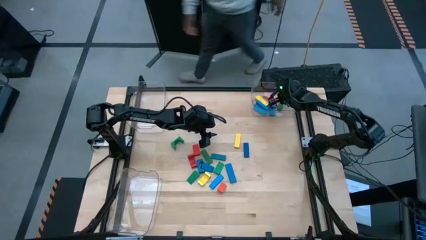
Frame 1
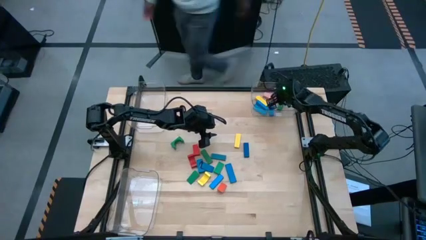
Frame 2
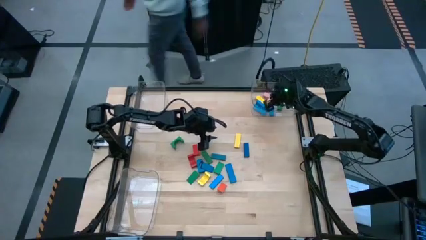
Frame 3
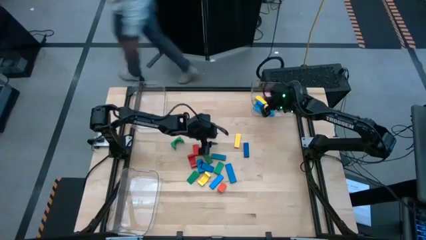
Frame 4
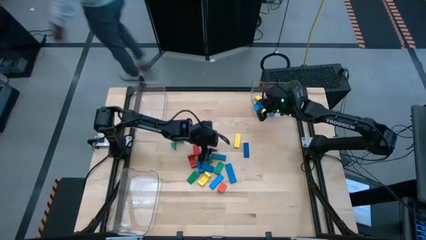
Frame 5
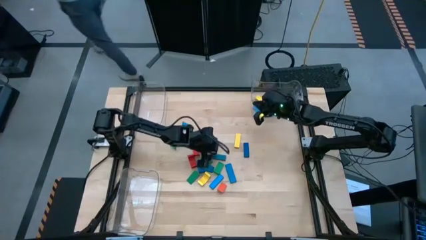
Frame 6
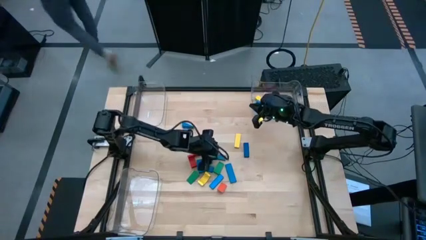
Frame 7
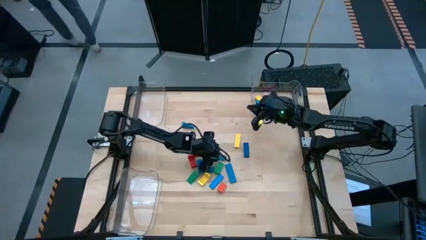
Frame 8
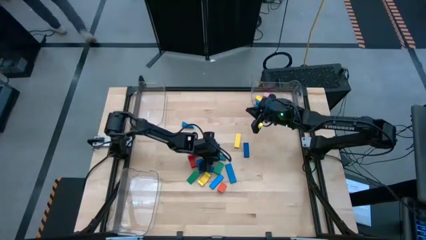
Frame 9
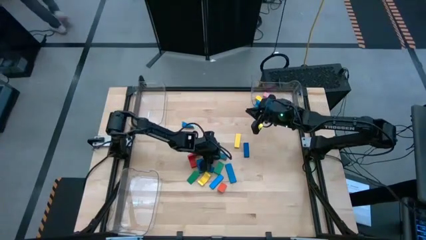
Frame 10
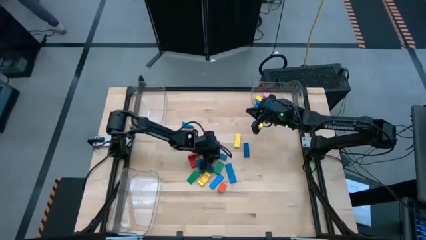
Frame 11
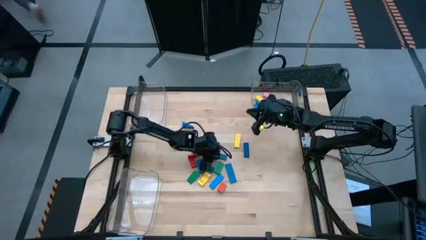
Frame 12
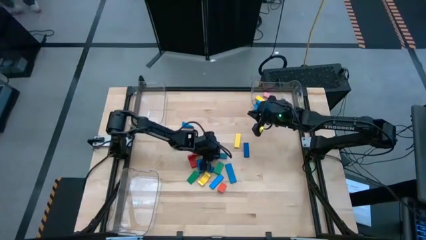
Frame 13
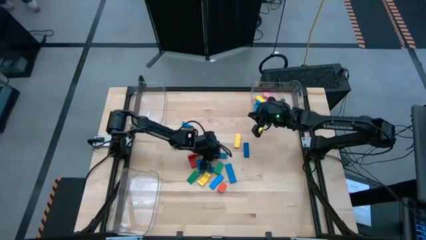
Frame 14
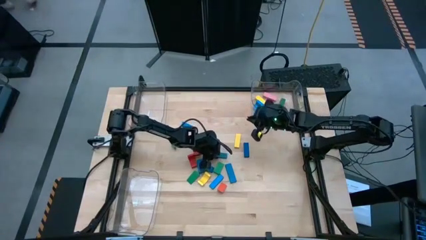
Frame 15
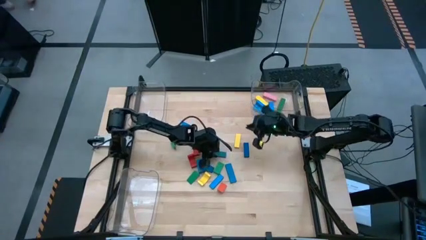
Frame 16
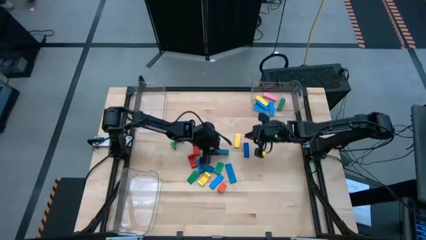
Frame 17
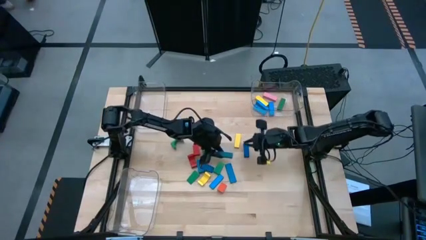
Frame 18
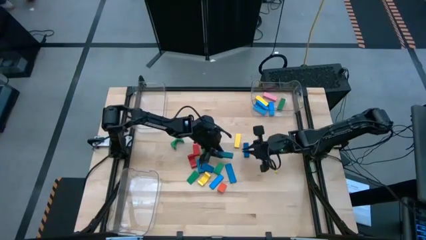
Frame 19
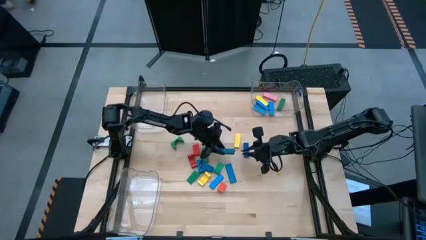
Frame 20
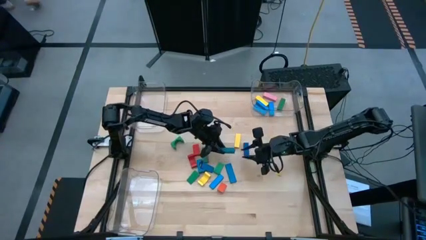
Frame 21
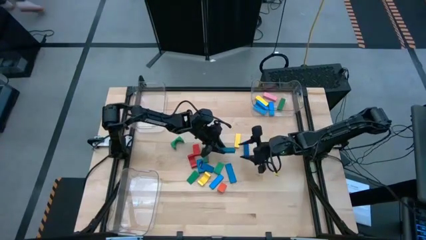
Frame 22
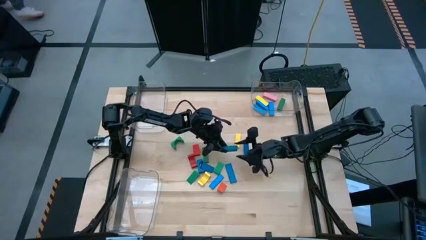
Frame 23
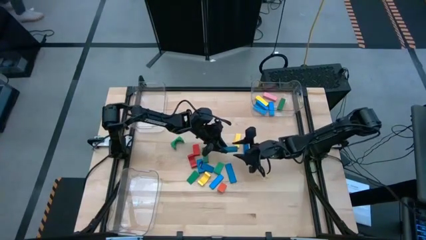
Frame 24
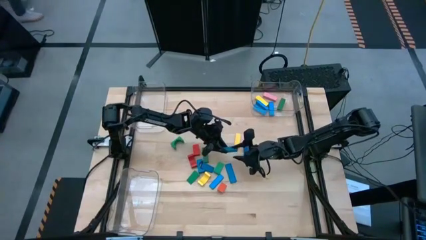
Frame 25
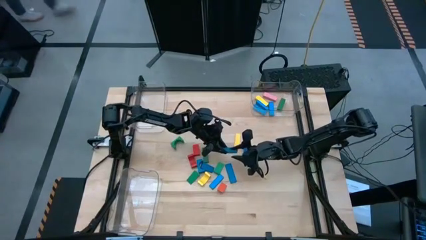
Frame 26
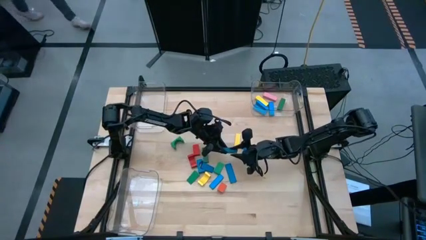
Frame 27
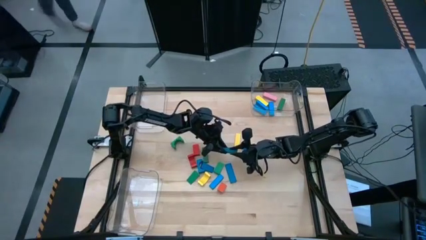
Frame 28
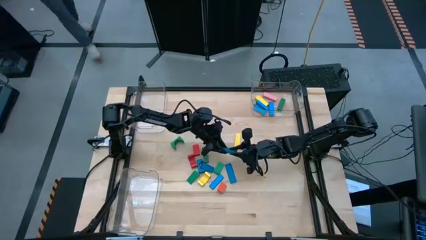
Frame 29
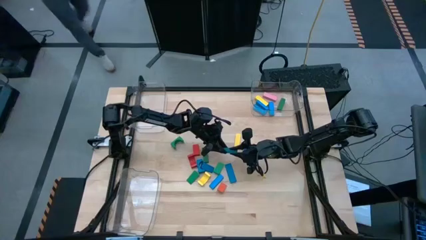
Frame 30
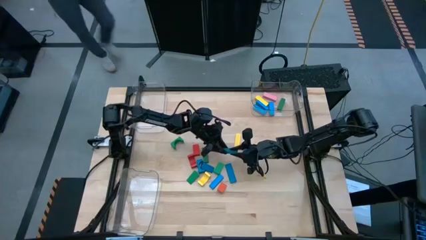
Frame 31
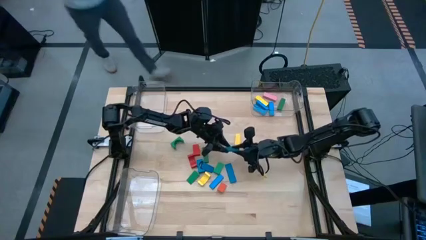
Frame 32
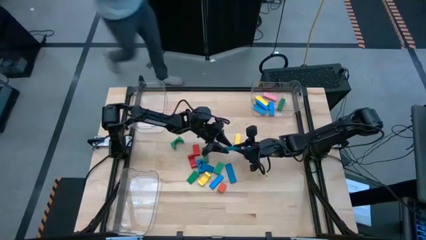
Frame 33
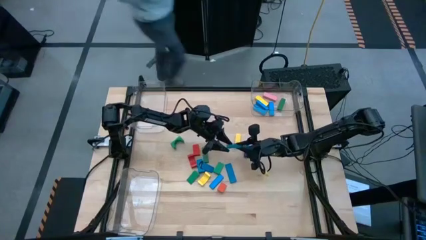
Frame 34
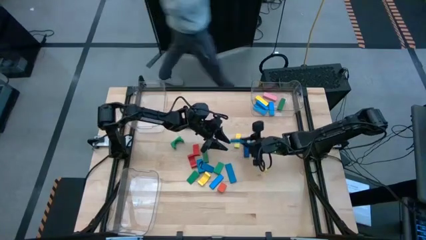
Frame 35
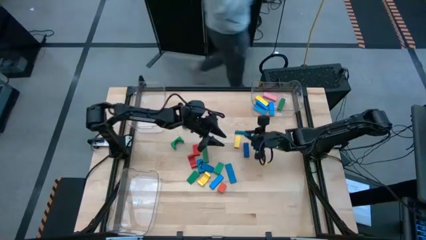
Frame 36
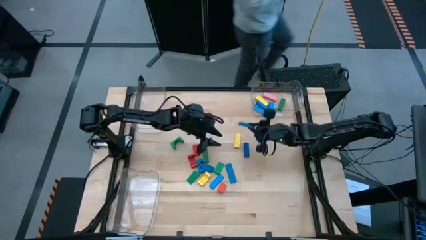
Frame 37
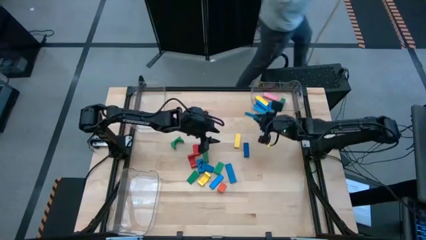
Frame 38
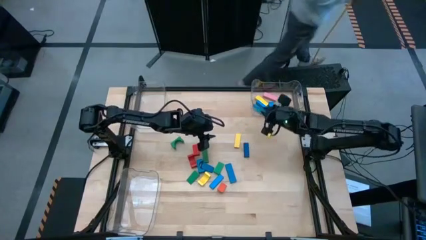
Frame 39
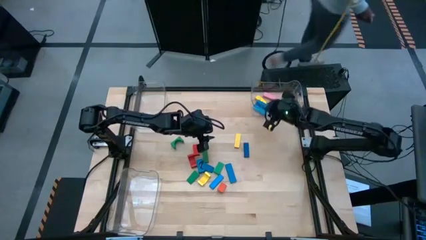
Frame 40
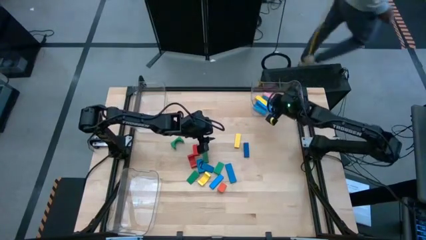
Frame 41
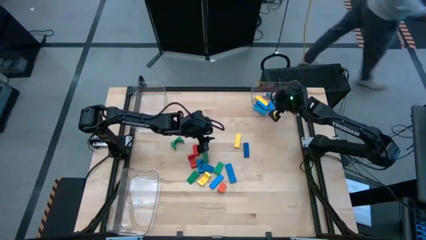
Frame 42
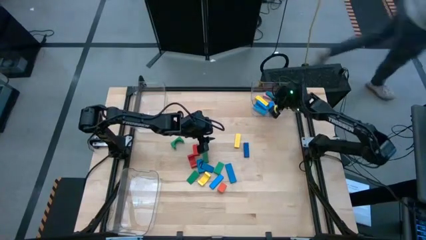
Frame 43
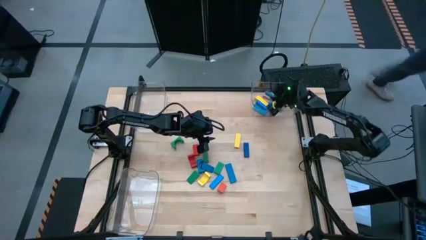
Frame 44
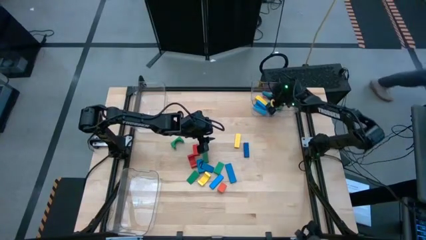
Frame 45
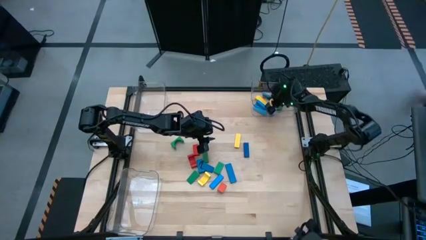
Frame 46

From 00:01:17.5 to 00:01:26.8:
Task: Sort blocks by size
Put the blue rectangular block into the top right transparent bin

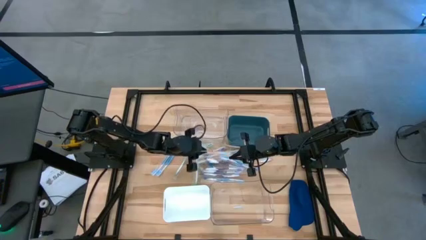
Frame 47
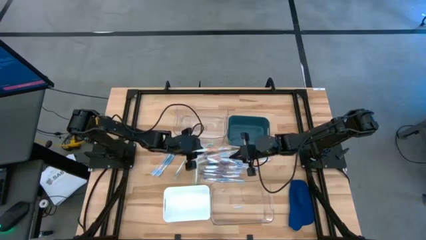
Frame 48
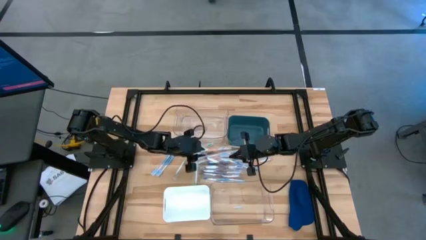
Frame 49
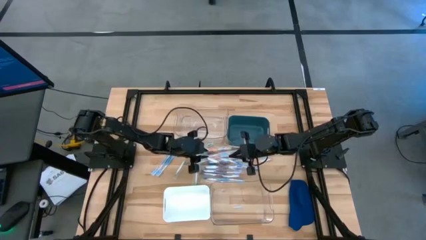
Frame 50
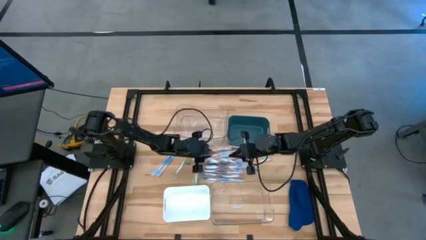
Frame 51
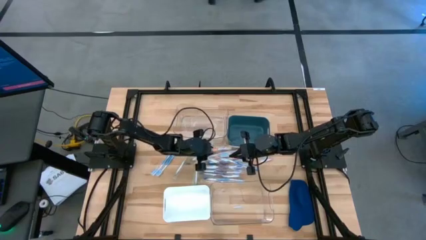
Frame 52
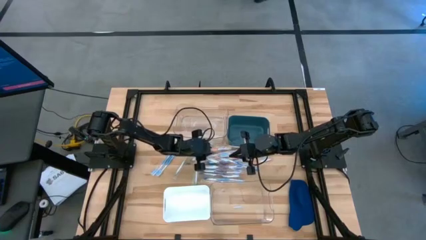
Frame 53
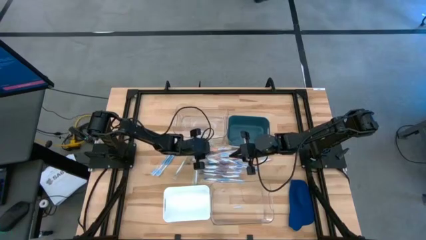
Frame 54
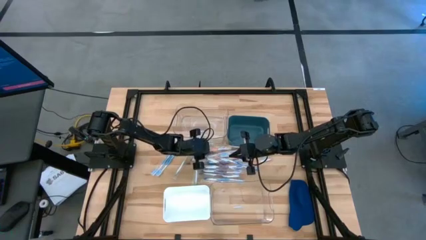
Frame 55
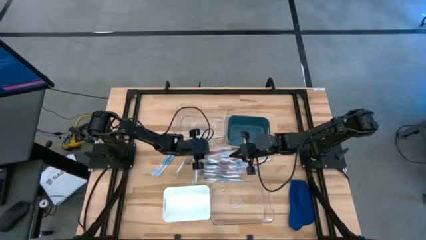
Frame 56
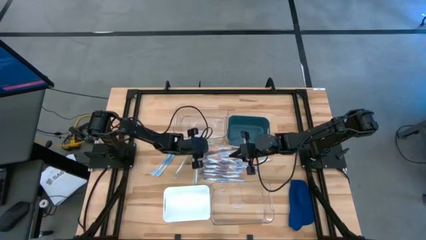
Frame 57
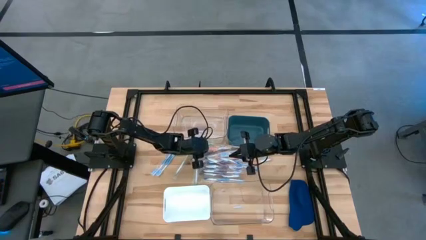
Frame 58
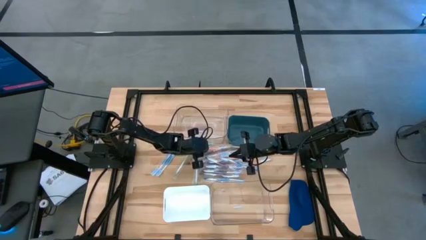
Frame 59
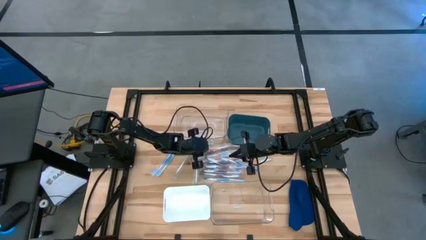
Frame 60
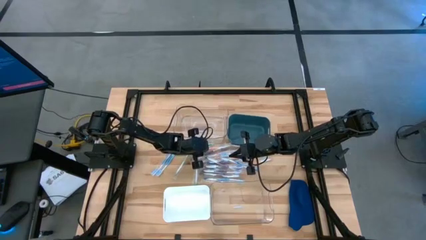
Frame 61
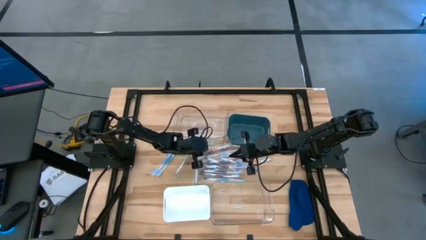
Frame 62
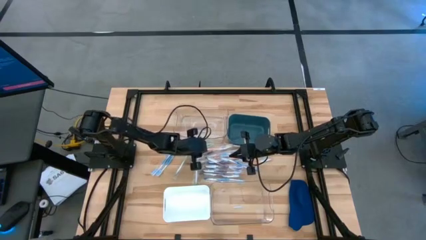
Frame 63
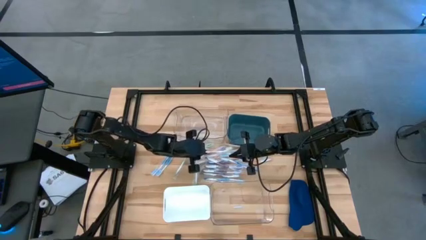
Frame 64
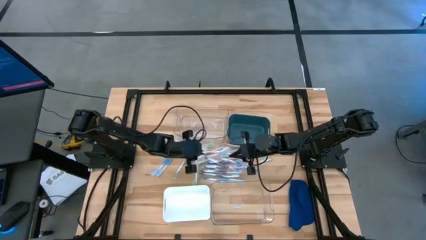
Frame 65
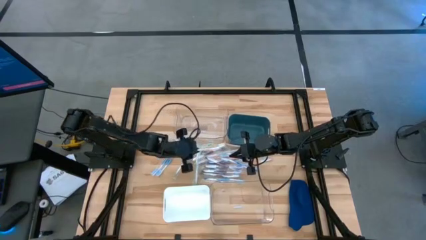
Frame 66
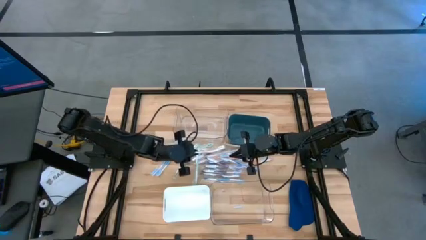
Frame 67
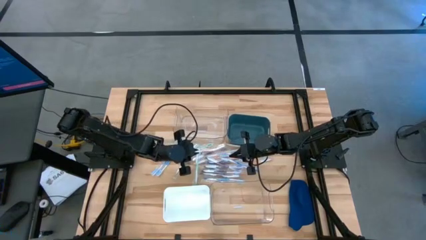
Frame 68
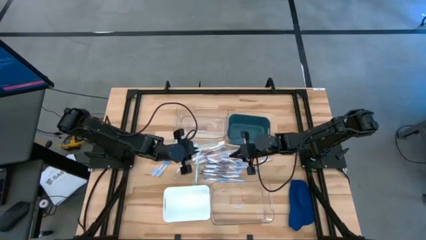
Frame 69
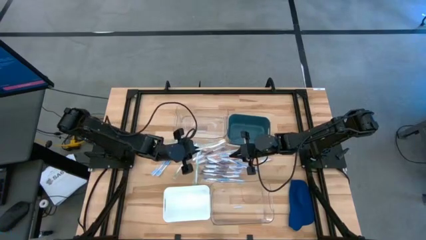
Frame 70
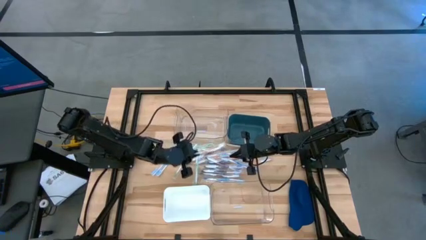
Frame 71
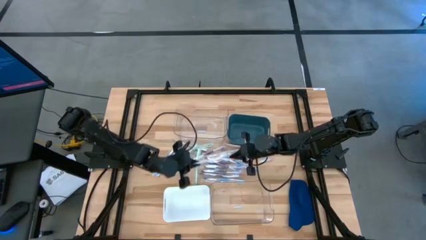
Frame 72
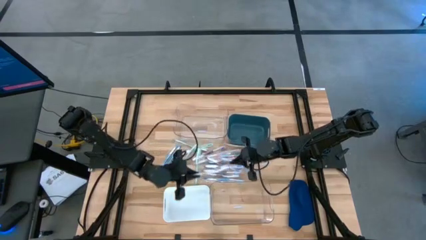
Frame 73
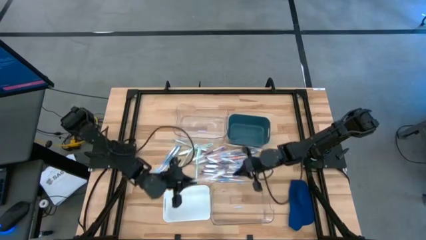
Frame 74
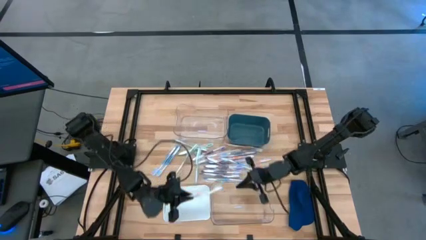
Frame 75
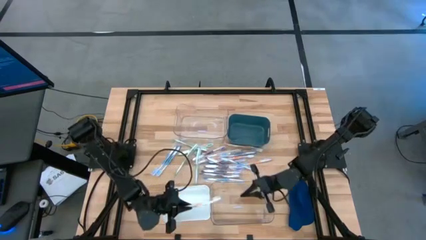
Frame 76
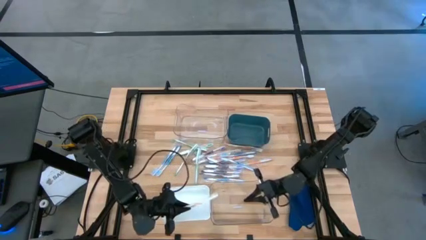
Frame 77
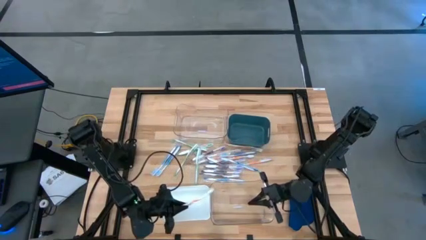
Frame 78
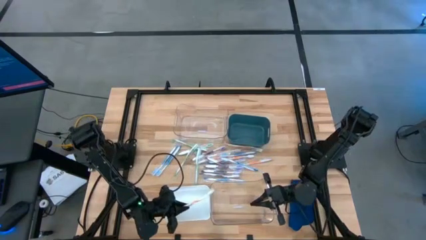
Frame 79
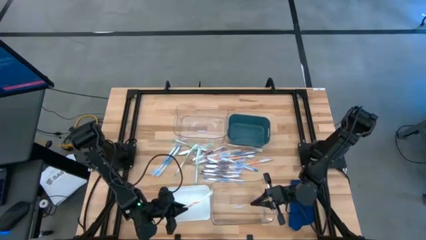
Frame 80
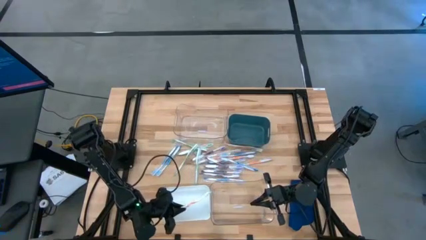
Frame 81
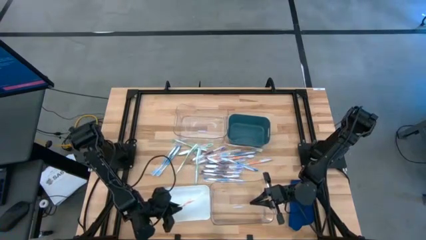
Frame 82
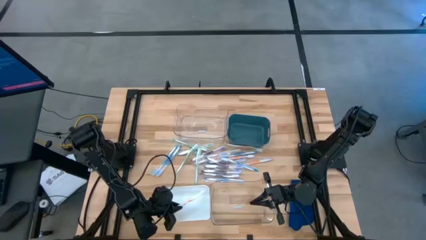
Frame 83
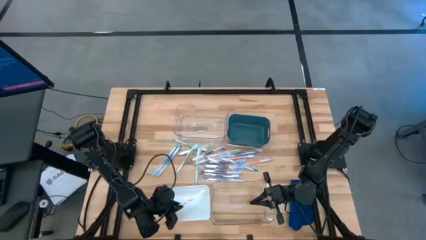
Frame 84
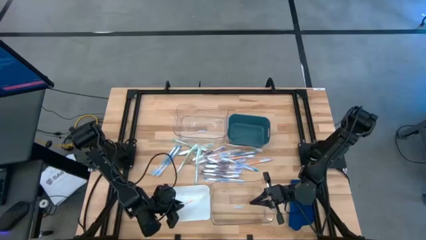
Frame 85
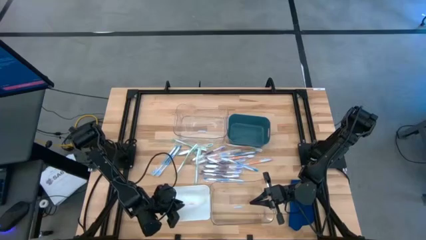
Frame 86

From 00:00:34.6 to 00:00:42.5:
Task: Pick & Place Toothbrushes
Put the orange toothbrush into the white bin
